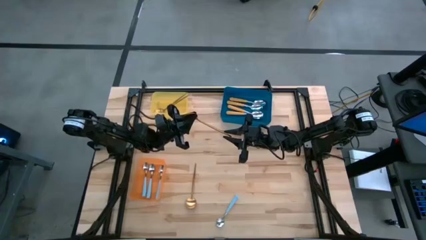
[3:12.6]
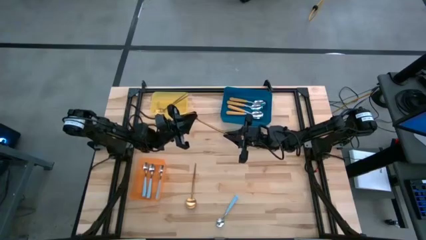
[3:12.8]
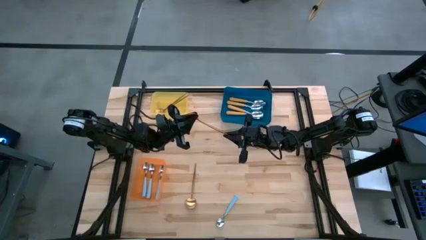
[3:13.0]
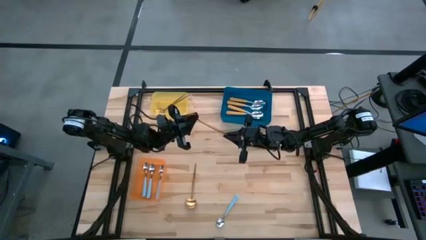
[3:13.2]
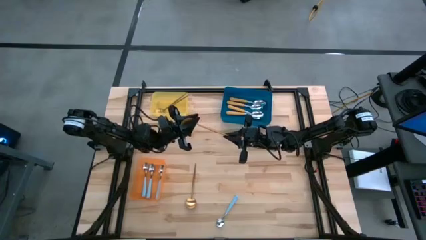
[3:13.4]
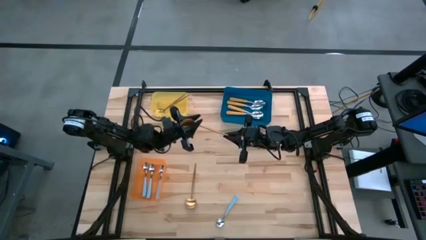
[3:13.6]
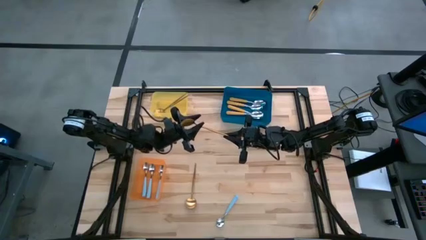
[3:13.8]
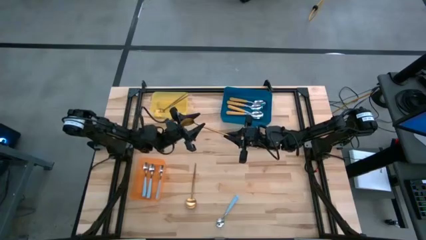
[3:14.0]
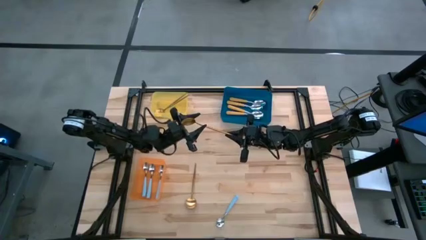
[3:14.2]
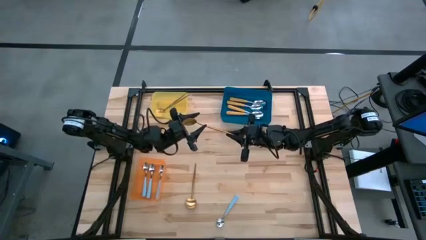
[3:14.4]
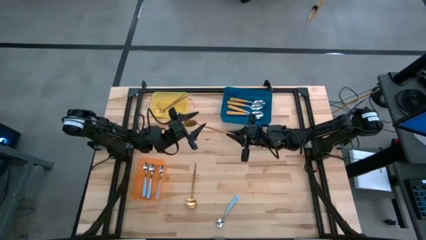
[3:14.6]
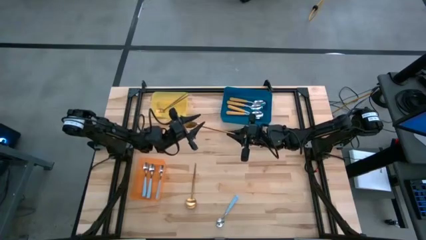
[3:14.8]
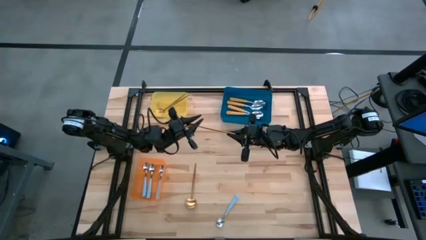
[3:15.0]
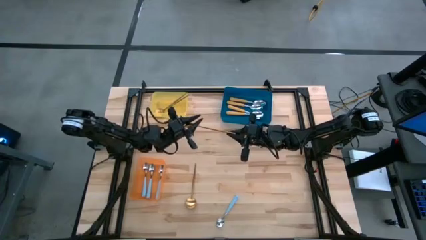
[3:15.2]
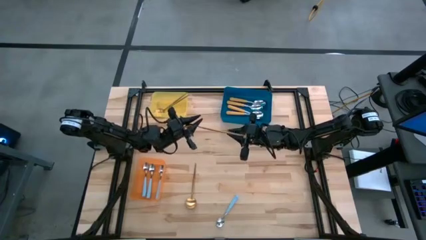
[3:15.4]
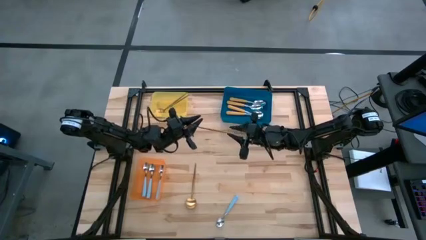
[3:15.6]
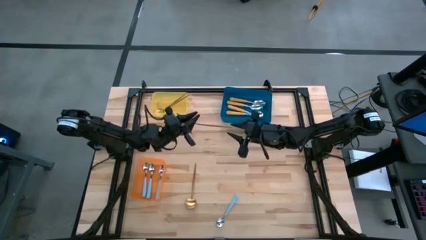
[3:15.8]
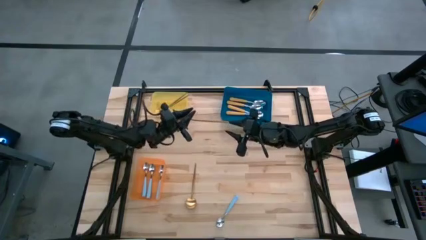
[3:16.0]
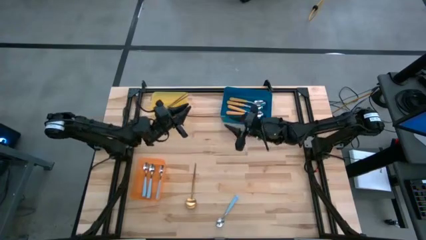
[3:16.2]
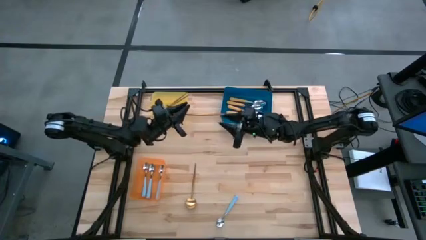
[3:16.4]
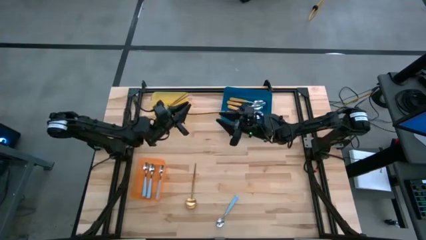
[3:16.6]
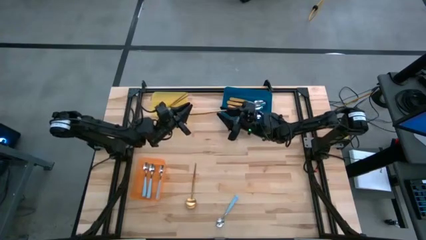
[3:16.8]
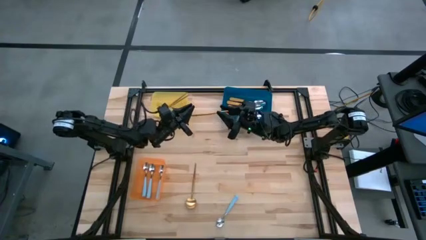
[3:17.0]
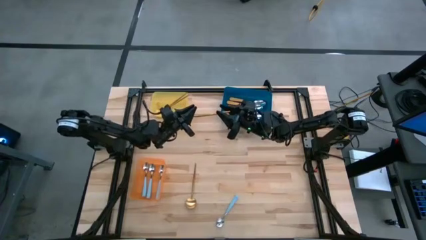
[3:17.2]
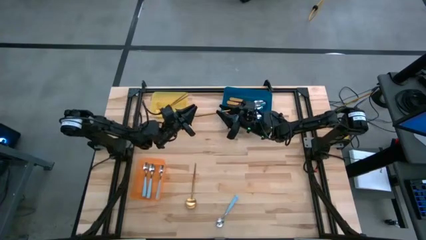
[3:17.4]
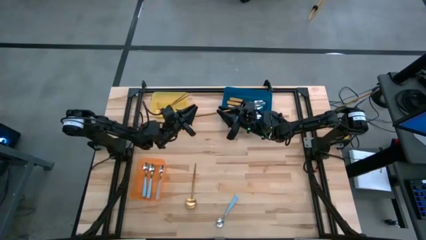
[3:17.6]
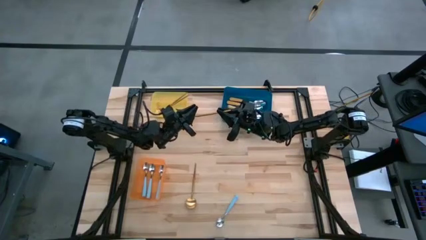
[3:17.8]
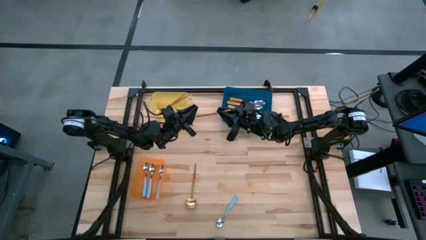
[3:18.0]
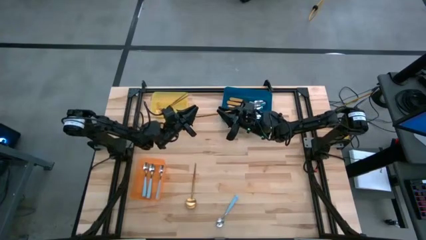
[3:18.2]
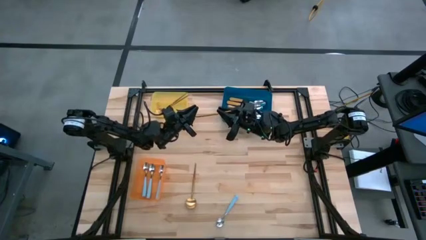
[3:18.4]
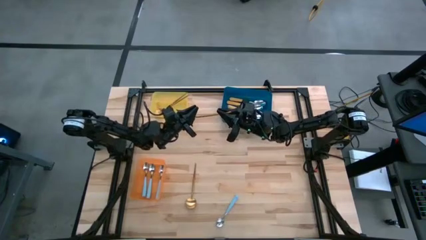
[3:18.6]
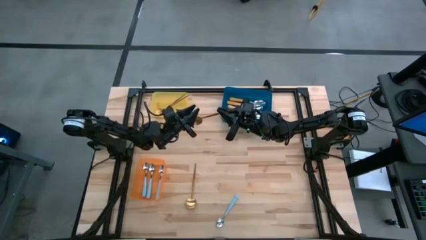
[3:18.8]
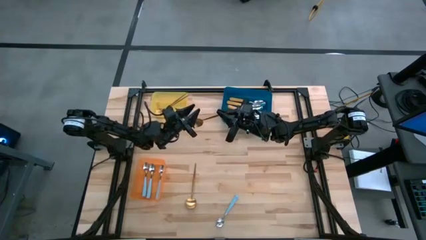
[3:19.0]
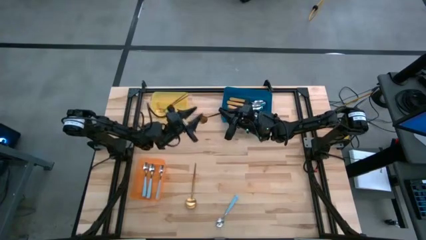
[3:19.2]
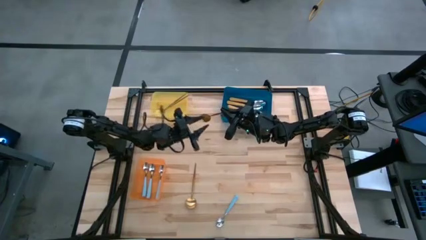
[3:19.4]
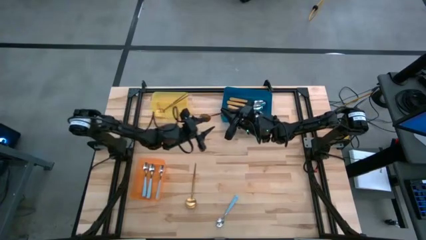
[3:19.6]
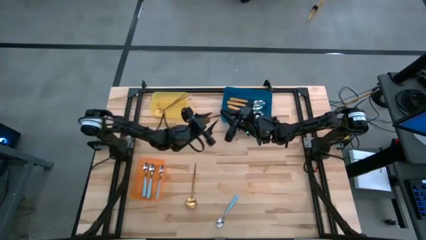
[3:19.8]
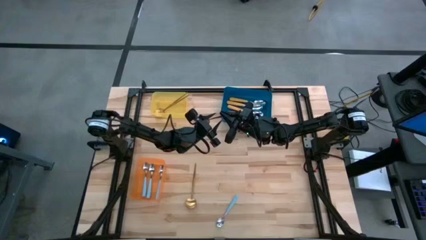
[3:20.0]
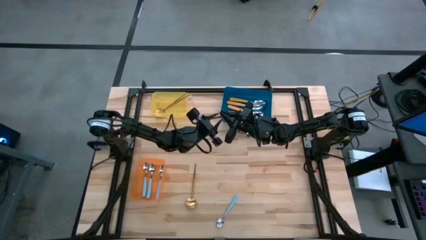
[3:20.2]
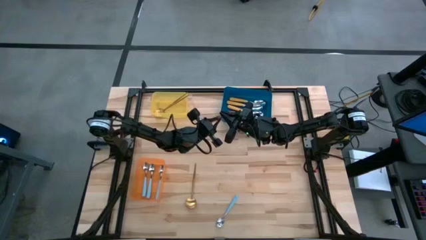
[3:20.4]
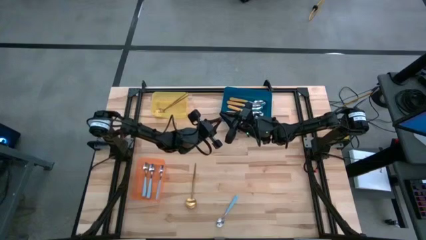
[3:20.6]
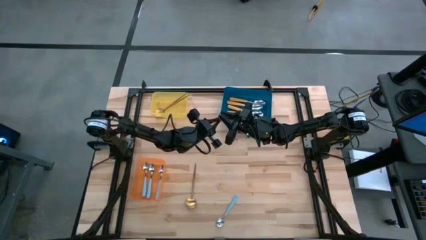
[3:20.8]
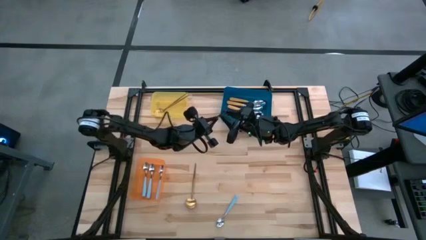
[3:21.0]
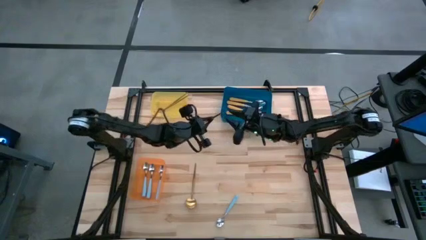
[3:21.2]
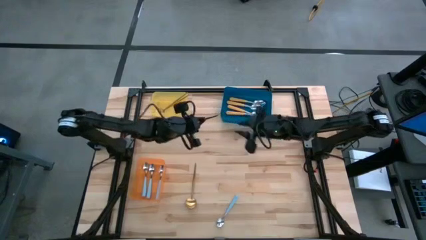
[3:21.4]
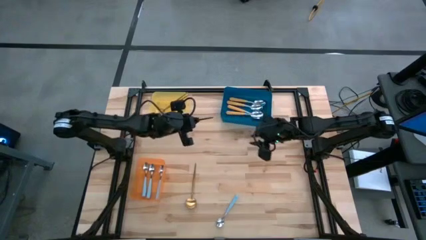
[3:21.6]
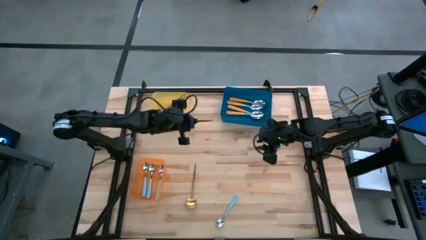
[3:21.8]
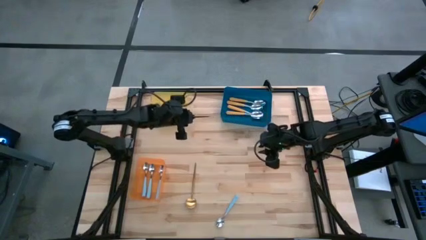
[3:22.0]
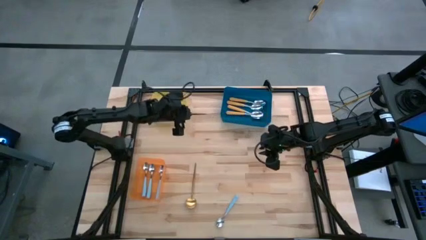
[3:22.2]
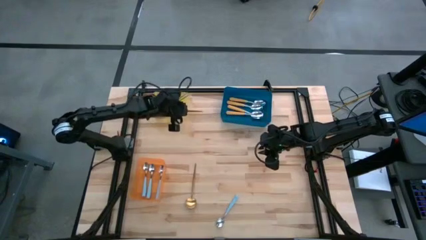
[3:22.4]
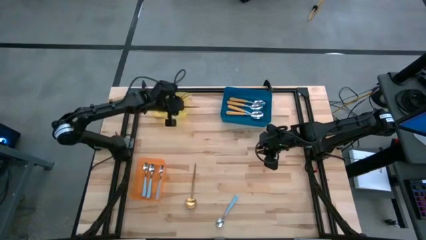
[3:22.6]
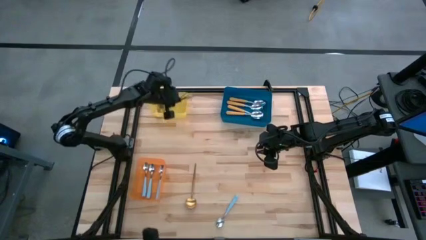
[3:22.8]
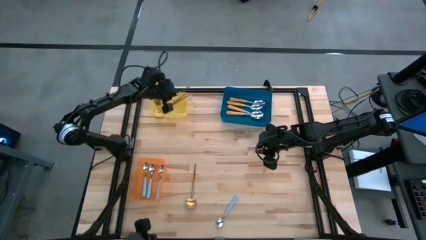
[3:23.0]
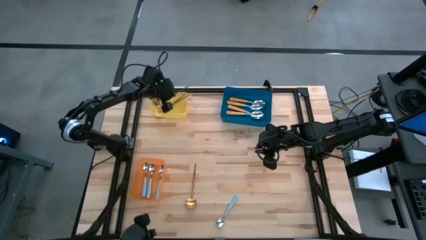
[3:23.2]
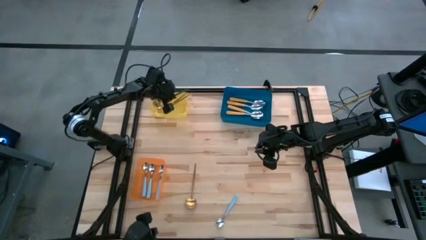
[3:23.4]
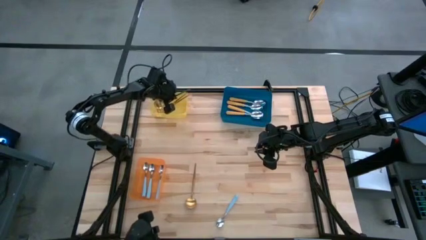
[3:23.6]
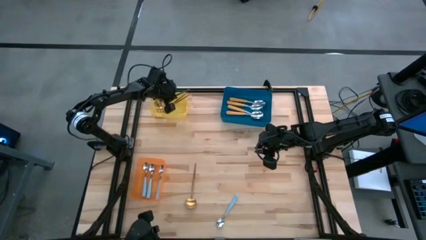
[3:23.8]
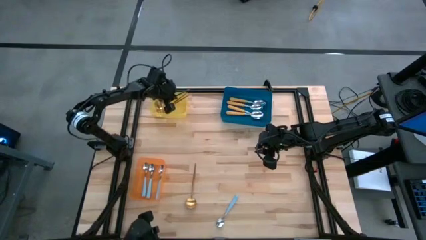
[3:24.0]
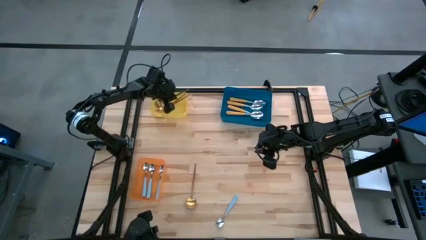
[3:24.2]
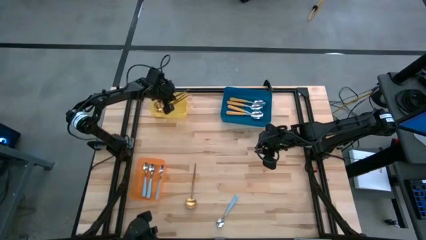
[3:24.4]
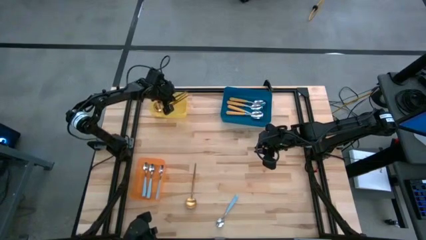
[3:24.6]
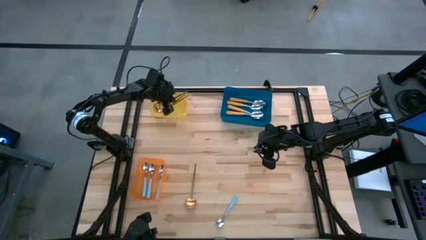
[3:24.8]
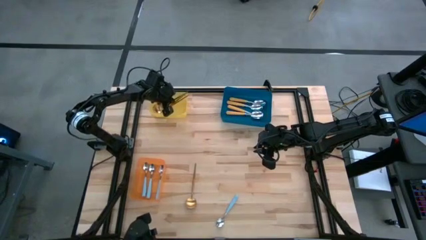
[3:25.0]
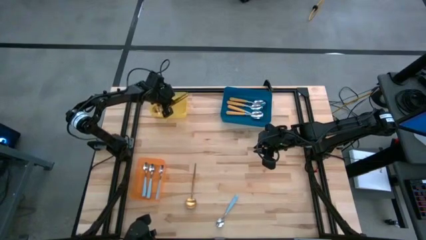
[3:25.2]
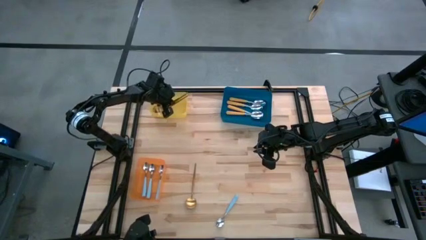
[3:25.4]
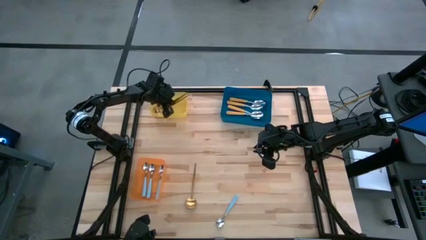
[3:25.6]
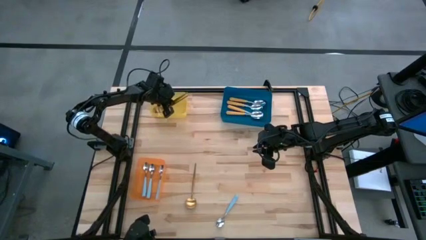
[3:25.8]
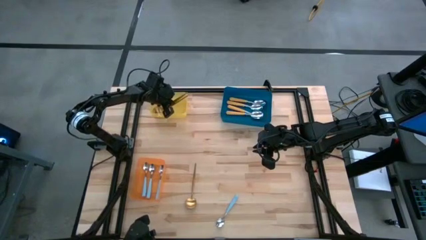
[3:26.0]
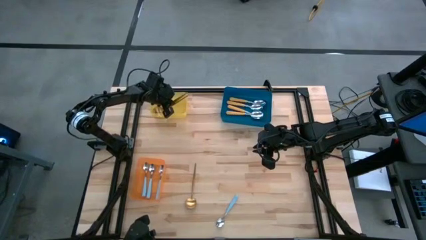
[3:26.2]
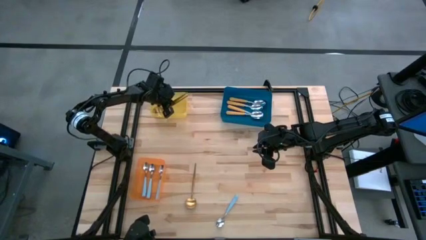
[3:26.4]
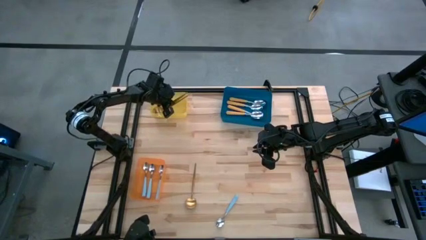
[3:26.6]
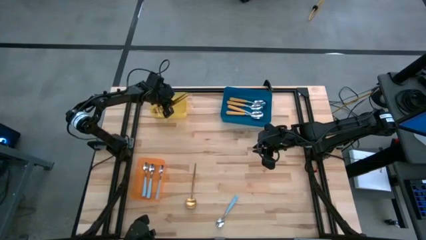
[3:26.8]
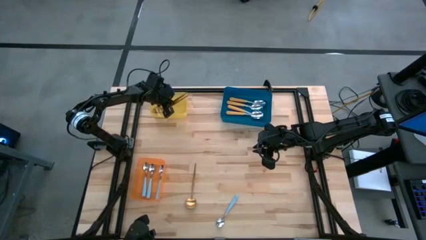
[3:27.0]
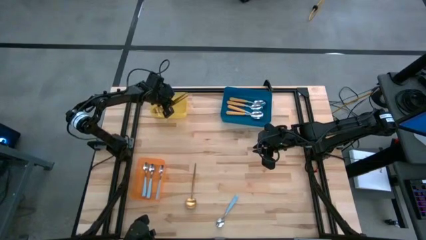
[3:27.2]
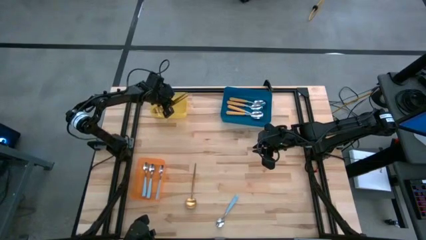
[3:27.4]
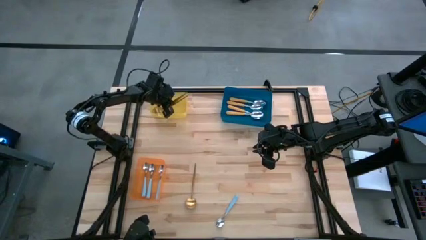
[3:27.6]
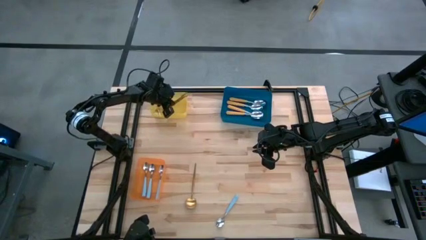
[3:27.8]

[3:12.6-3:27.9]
Task: Sort silverware by color (type)
Put the gold spoon into the yellow bin

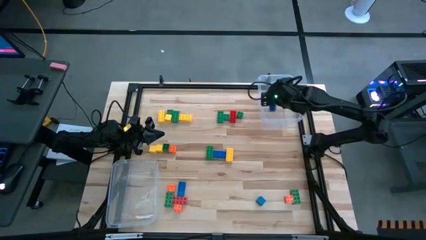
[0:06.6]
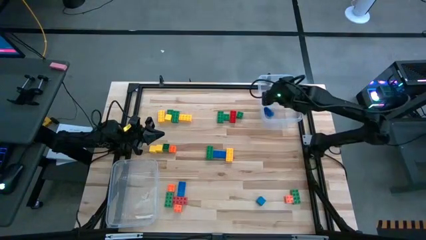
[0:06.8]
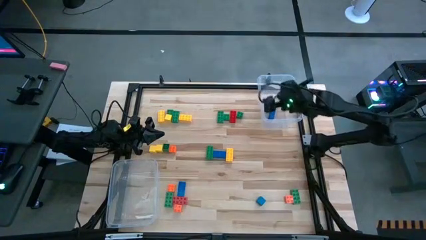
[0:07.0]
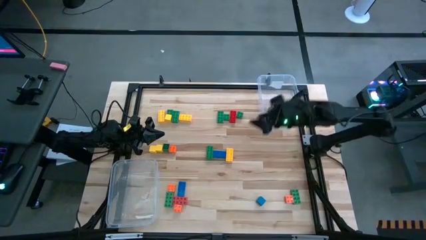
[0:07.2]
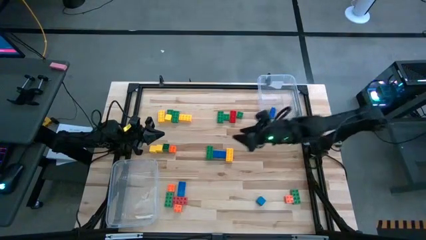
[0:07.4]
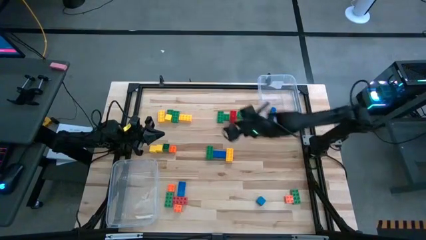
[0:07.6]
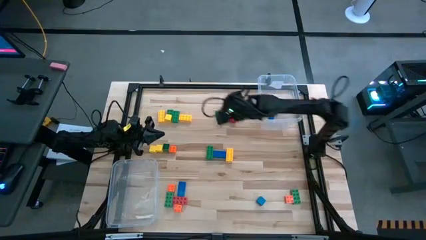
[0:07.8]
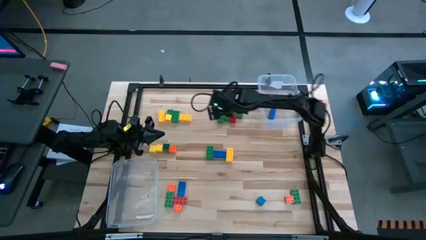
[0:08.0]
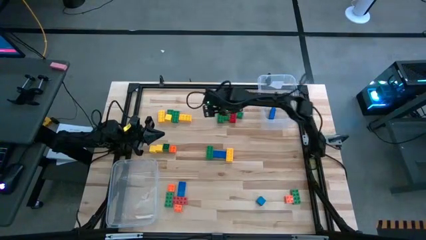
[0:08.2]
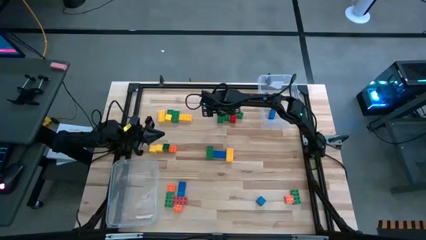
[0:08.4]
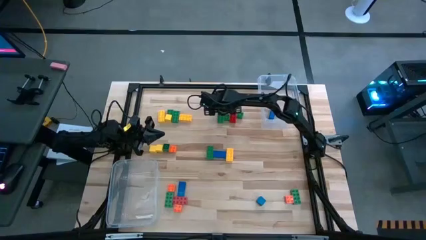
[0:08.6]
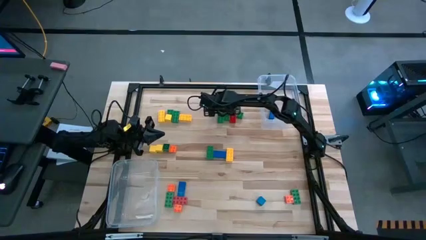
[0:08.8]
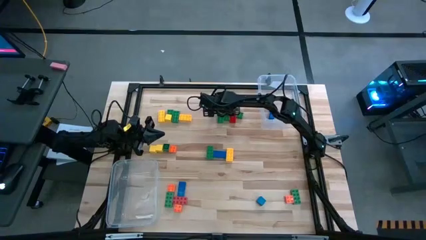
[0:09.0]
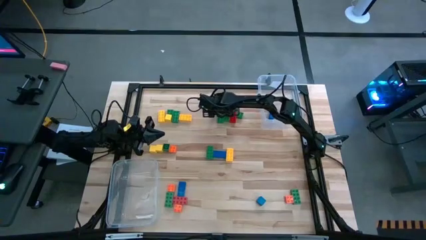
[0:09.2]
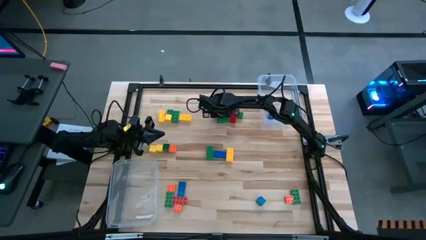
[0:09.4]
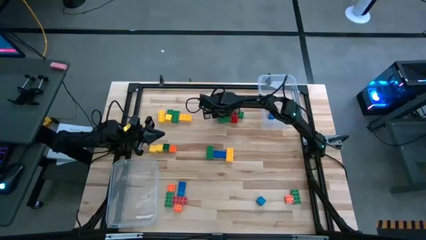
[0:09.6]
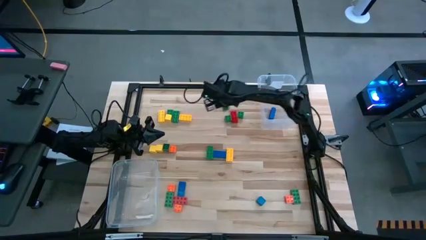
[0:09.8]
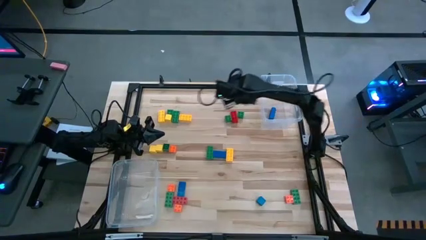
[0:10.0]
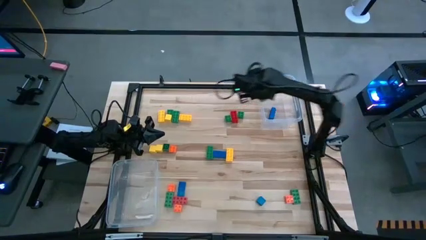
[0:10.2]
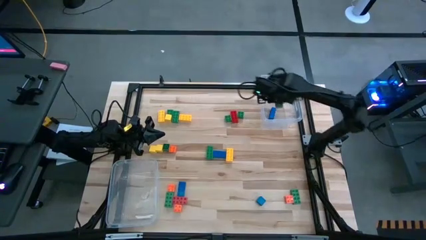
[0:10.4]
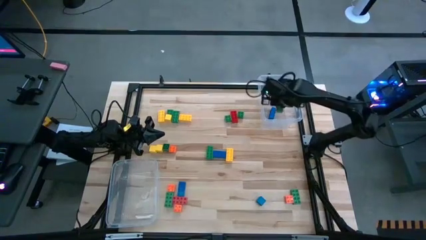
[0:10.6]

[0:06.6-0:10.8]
Task: Sort blocks by size
Put the top right large green game piece into the right transparent bin
